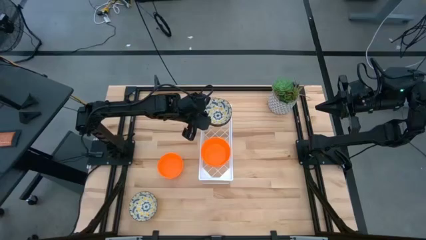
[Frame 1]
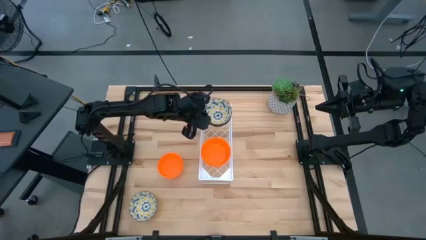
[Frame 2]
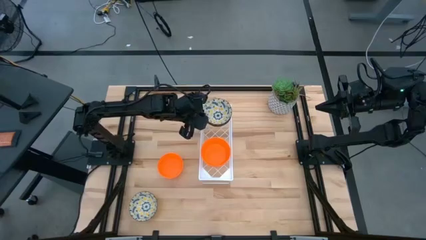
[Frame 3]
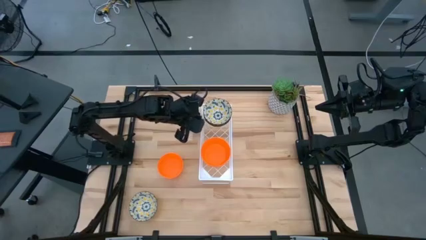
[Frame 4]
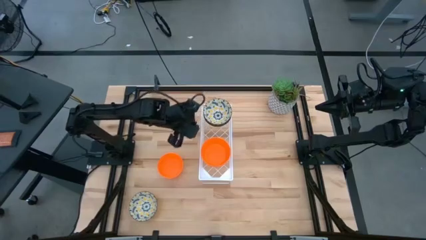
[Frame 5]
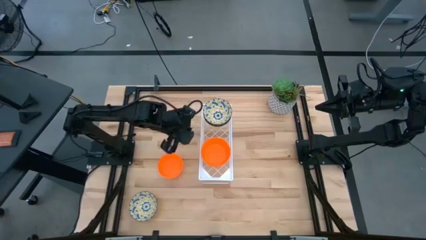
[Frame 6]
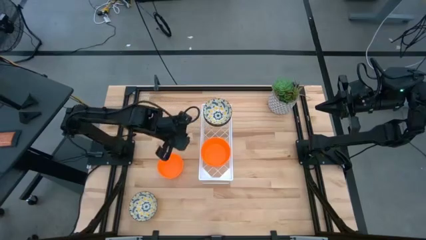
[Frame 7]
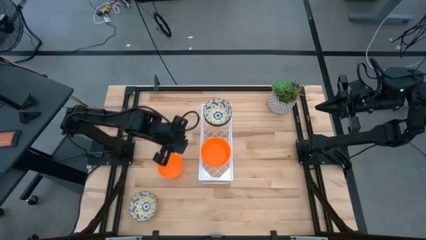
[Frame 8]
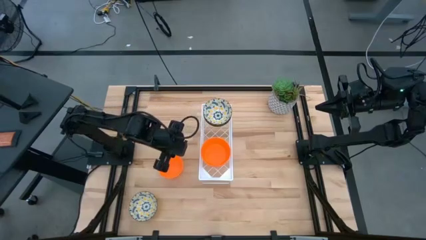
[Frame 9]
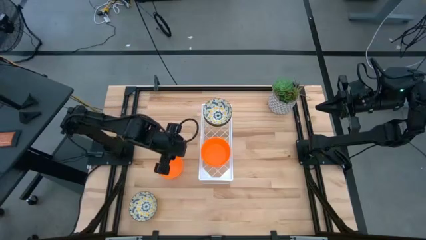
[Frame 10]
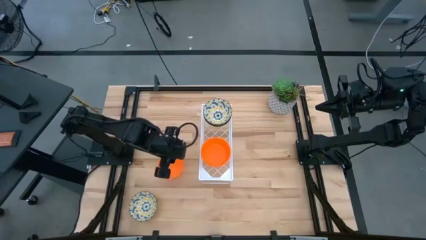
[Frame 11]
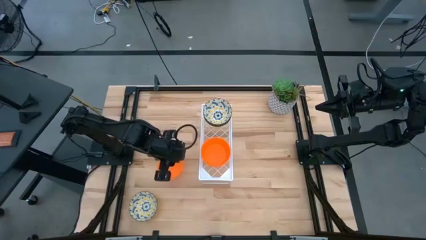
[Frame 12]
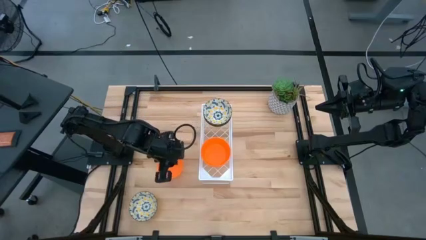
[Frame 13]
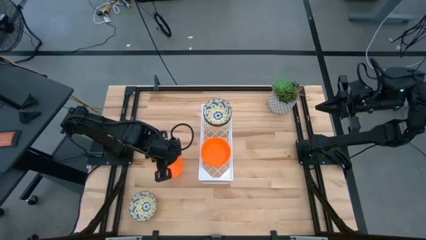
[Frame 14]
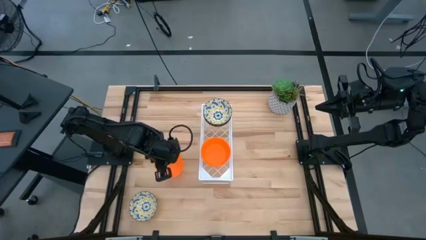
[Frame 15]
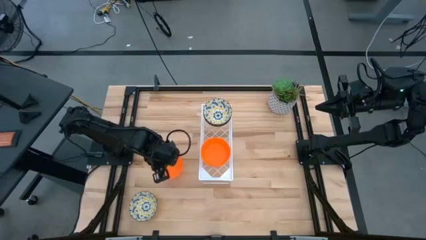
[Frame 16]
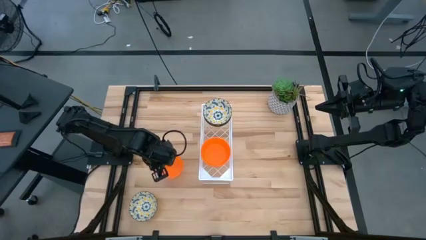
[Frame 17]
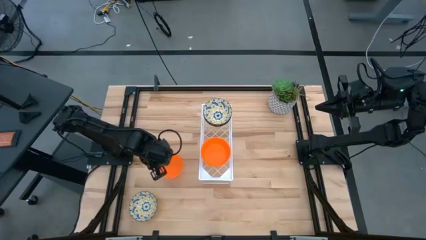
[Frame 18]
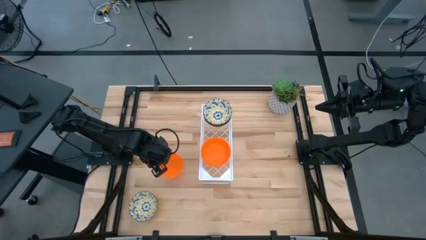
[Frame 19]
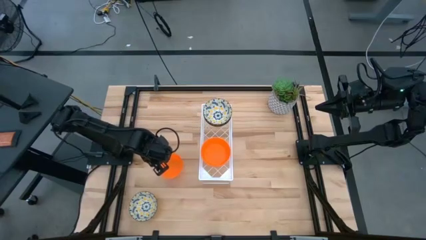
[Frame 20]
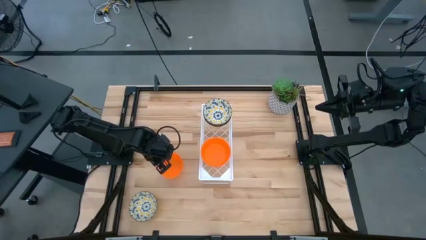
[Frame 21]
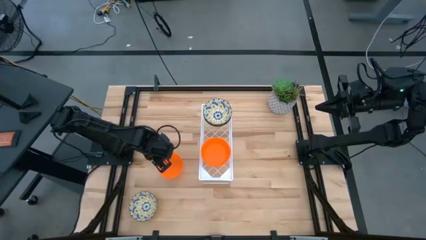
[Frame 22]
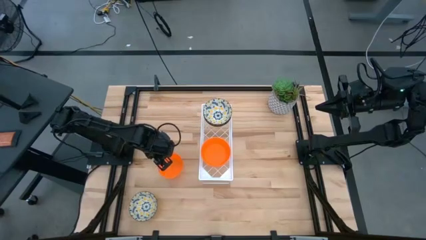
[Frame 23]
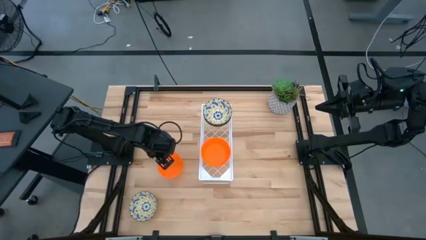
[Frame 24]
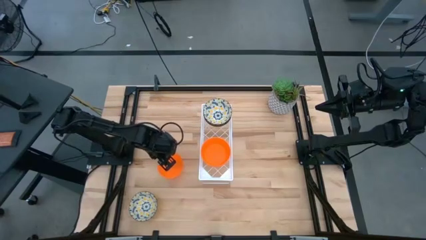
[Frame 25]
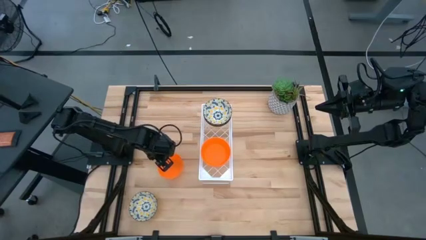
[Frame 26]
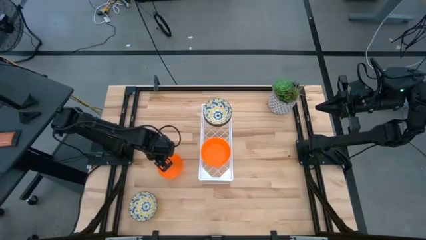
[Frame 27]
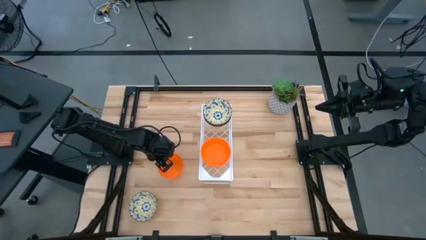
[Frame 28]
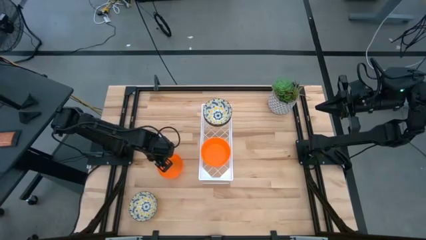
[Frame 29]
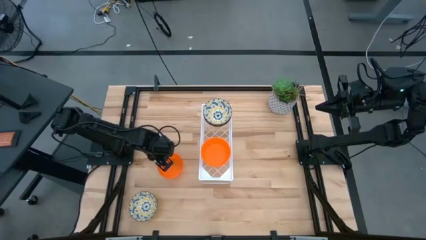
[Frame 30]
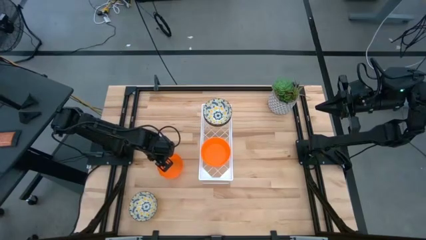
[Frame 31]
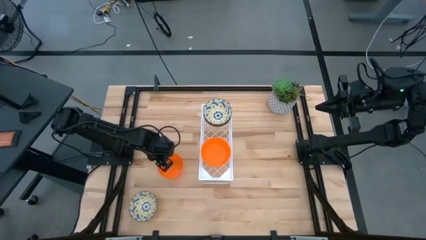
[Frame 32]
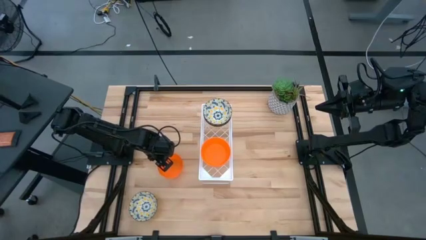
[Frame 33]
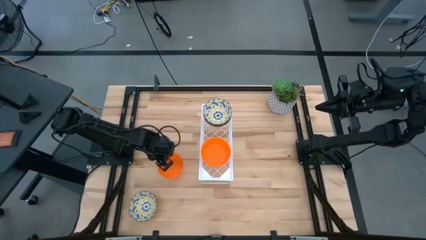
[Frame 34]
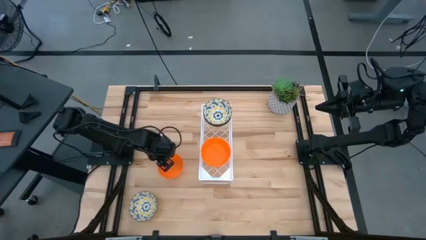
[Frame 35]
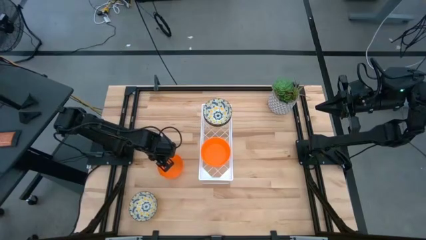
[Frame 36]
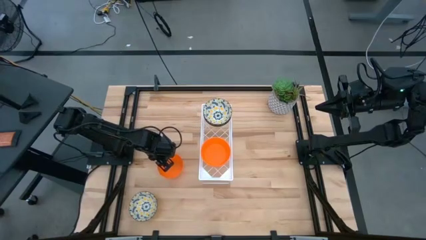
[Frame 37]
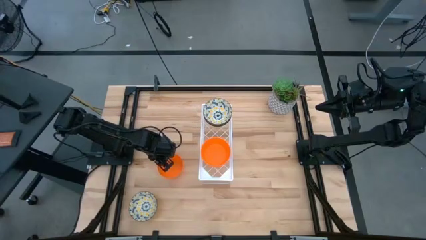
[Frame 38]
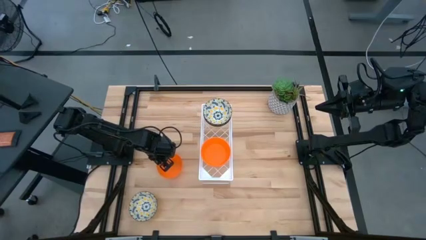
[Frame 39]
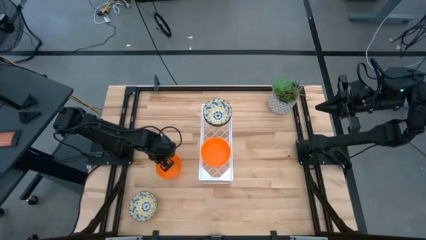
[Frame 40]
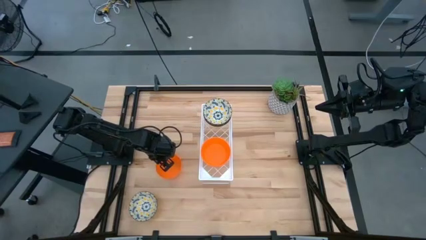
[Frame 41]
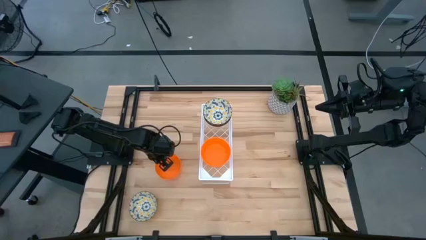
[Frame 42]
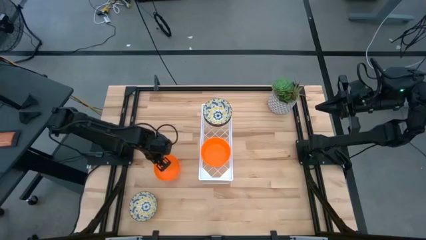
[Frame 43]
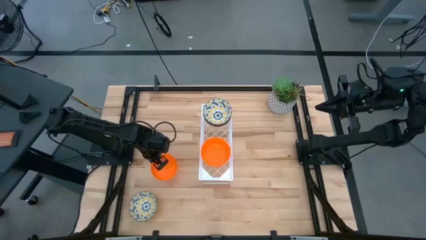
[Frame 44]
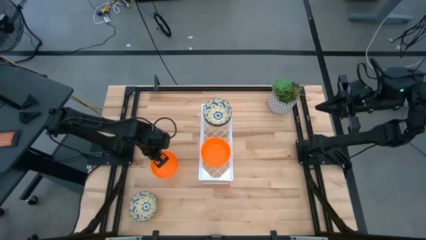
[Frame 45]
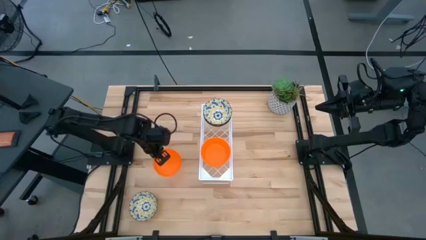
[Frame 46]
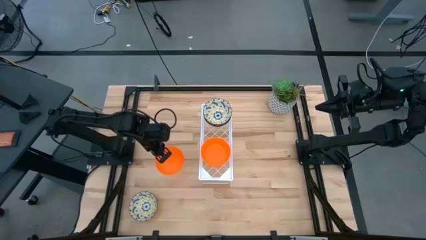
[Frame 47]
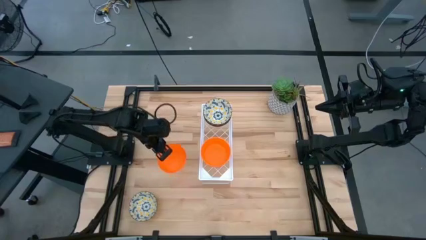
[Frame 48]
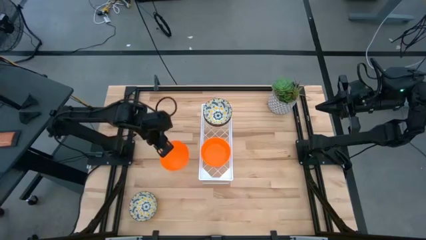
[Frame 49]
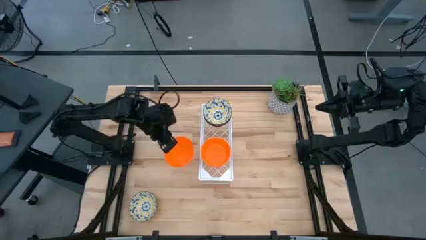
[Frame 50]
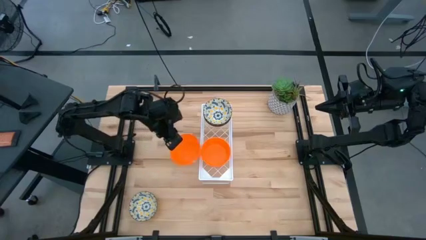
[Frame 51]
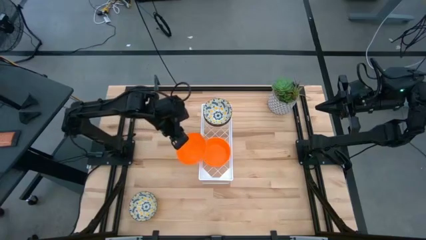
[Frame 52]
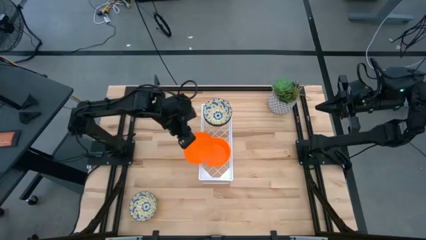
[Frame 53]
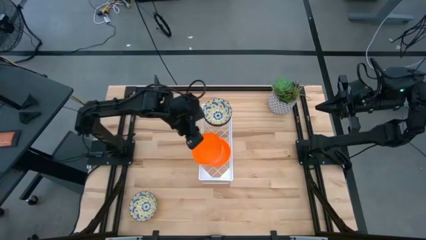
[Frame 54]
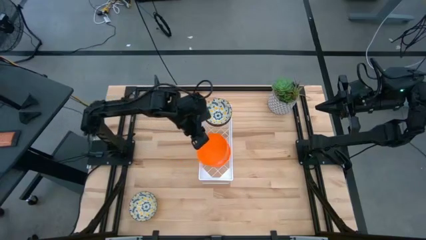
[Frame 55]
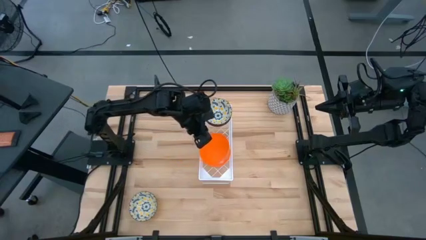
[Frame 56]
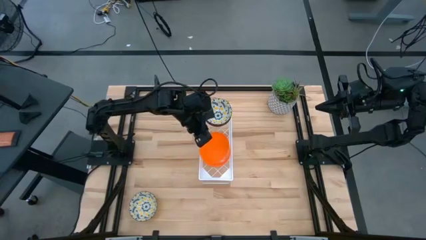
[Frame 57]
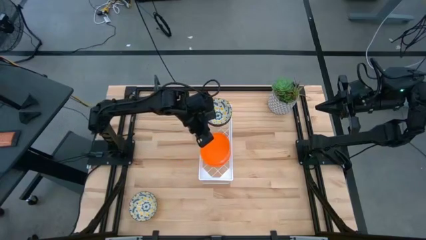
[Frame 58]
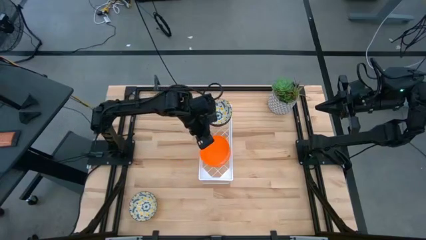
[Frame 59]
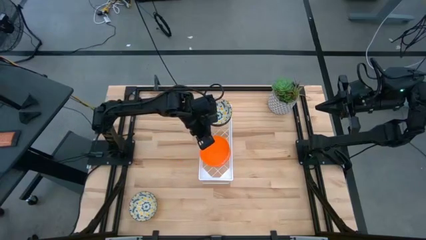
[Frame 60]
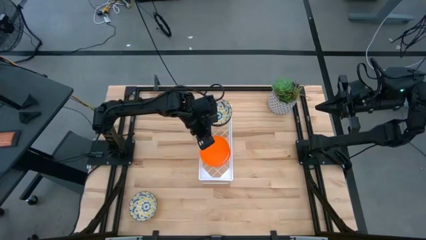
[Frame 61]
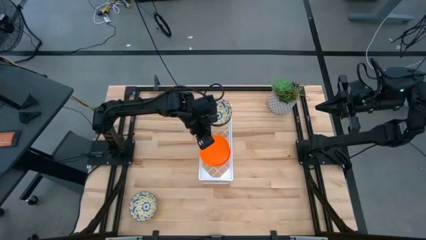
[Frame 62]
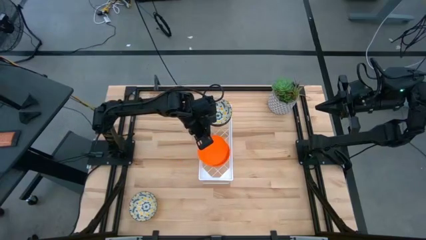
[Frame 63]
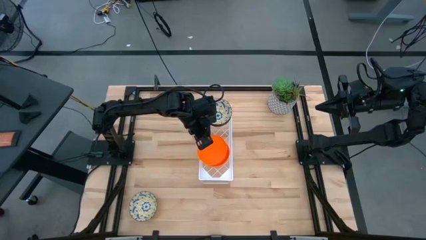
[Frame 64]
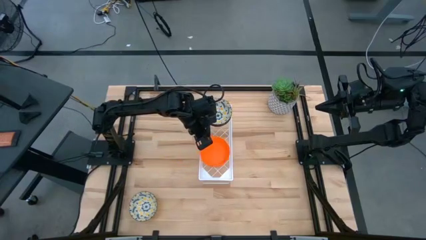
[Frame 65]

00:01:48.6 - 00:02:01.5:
Task: Pick & Place Mini bowls
Stack the orange bowl on top of the orange bowls on the shelf

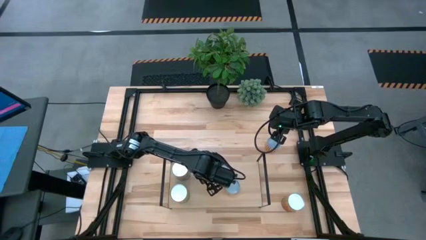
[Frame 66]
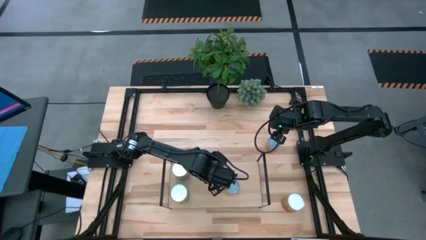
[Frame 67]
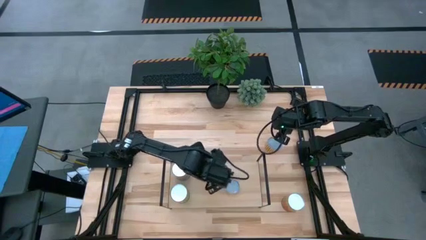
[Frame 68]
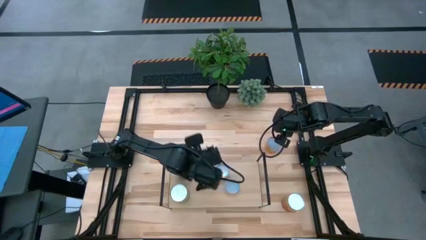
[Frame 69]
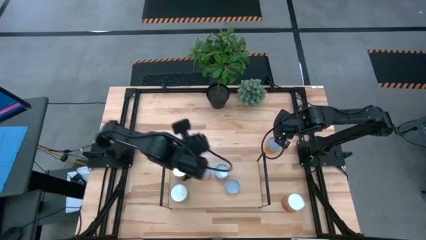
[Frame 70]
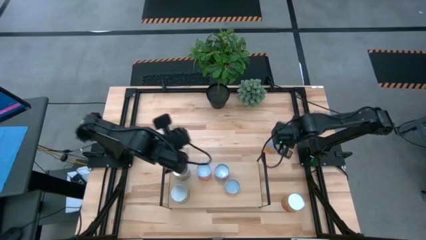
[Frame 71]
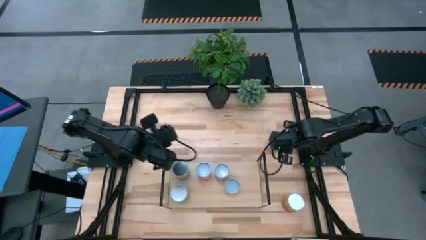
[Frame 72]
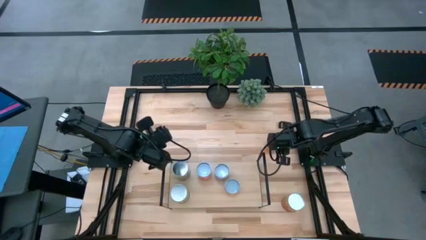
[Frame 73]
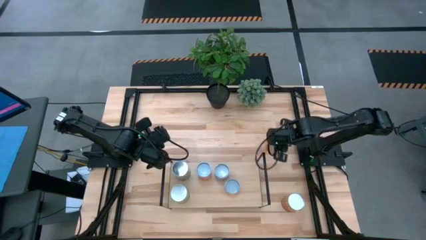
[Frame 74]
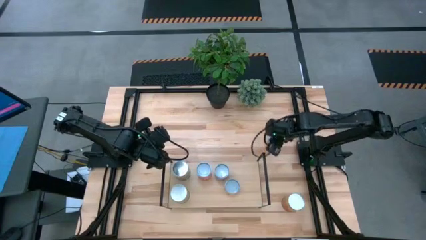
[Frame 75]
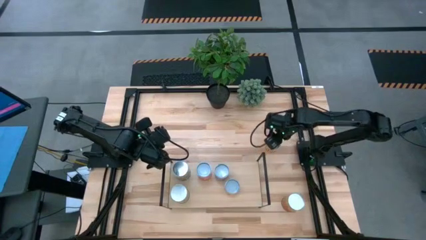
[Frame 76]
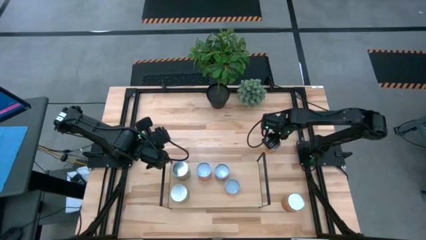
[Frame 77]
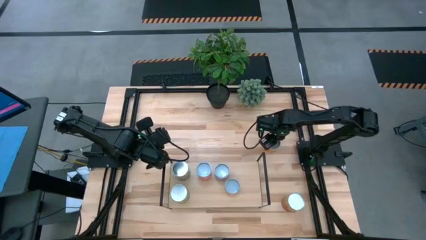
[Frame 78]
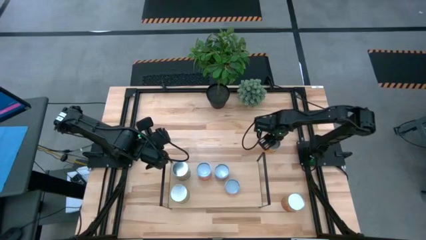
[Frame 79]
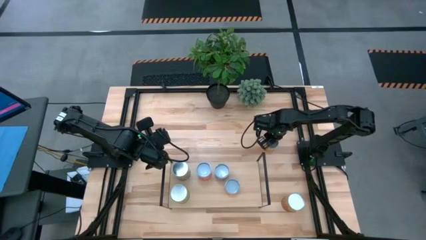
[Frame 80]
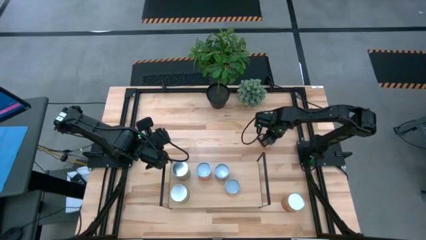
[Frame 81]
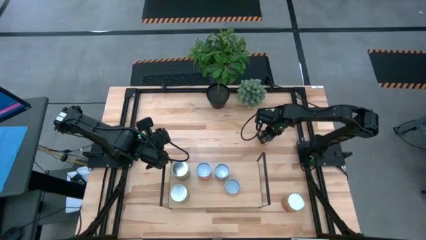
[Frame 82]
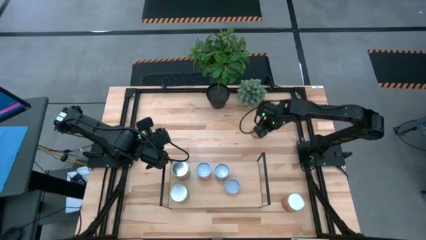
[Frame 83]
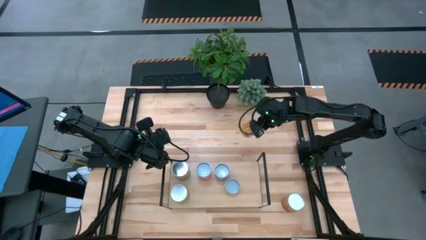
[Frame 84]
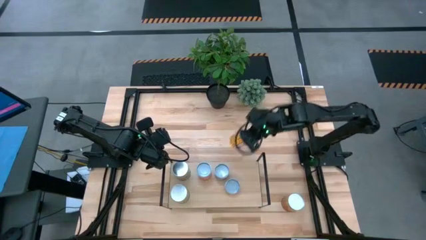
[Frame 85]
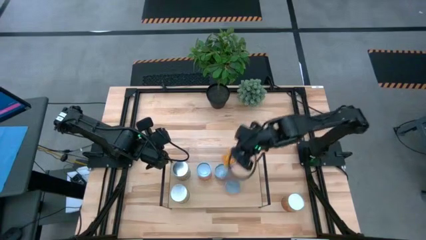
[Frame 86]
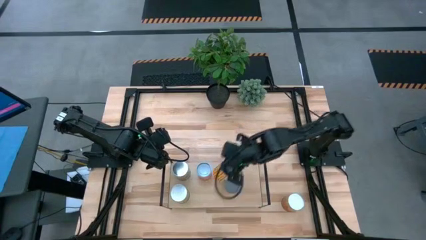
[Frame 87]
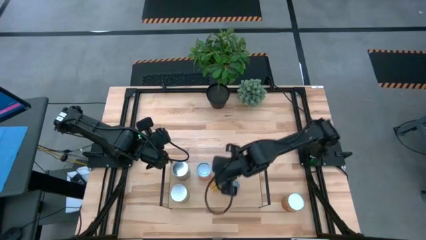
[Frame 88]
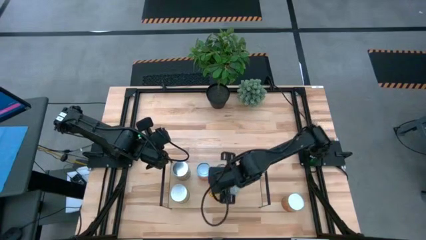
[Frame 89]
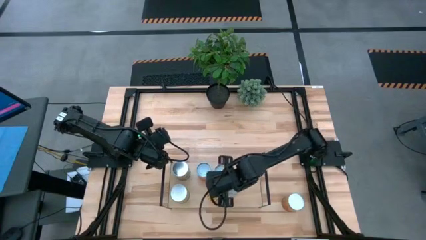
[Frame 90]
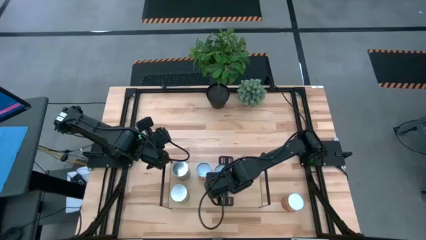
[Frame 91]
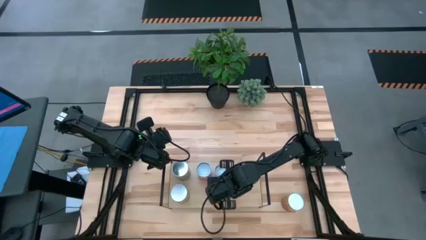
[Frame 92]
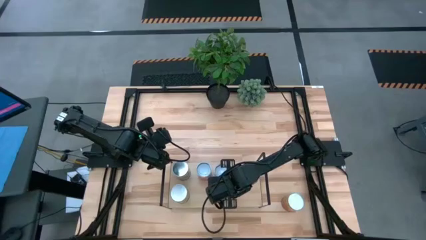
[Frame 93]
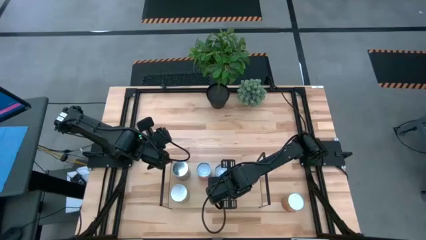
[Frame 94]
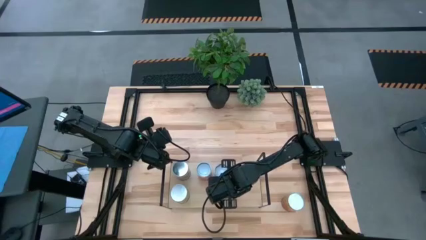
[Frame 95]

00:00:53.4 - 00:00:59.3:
Task: Pick and place cans onto a shelf
Put the yellow bean can on the shelf aligned with the other blue corn can
